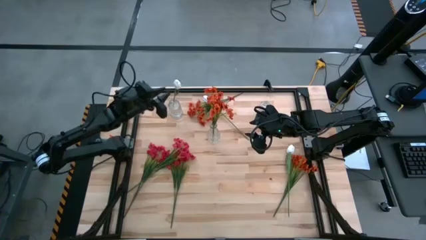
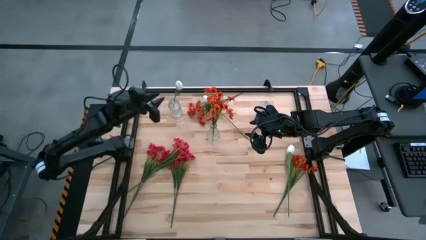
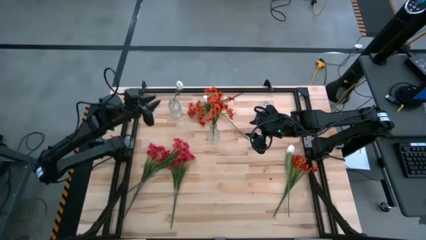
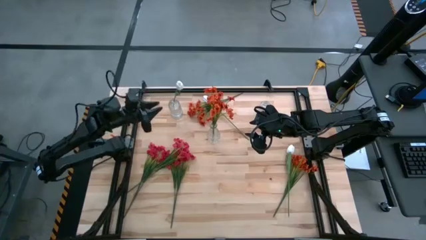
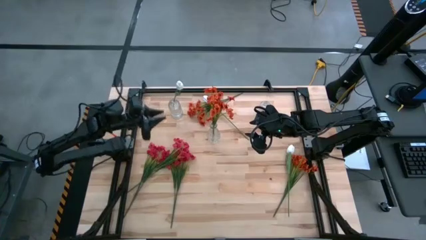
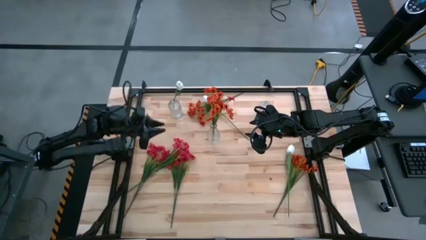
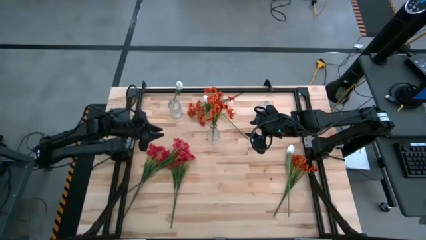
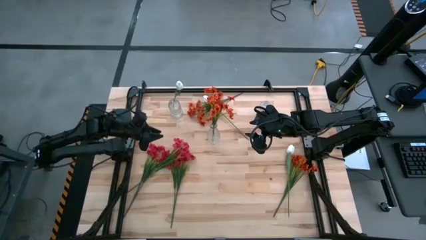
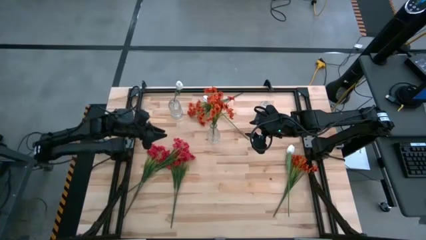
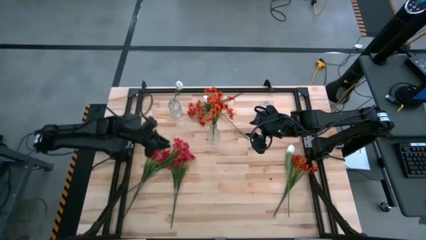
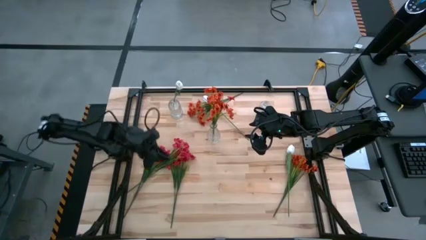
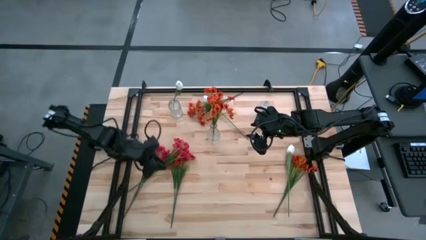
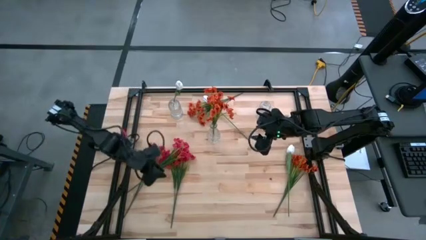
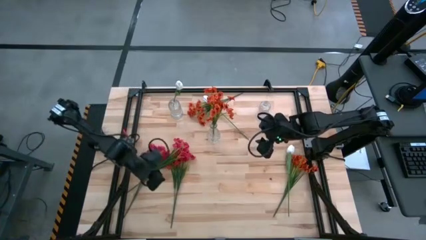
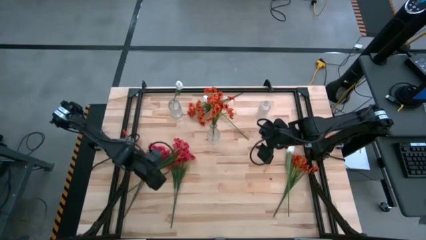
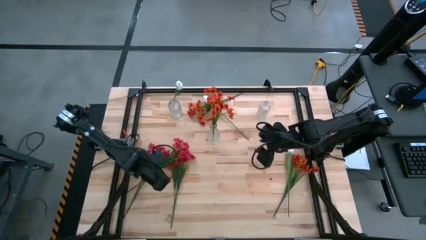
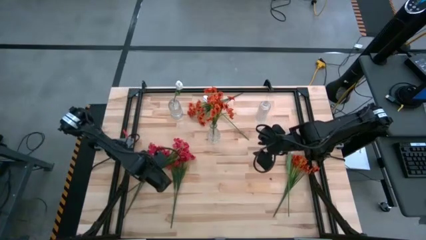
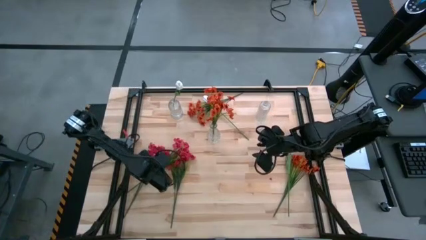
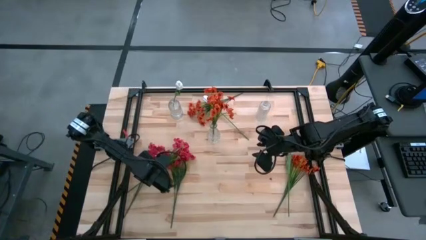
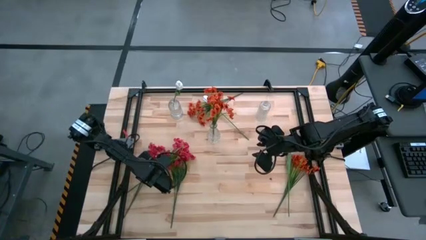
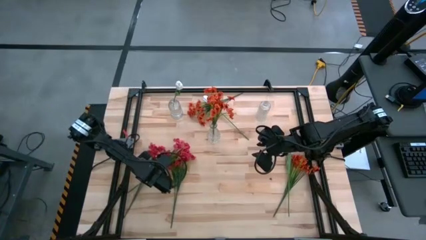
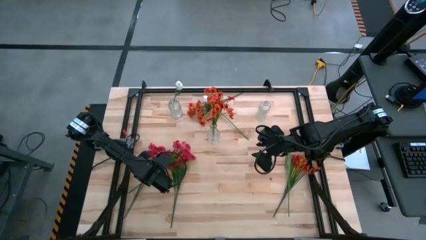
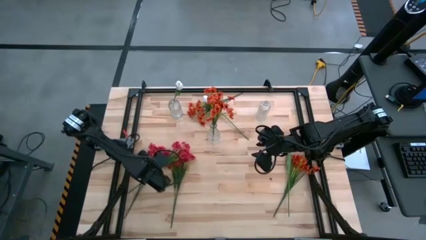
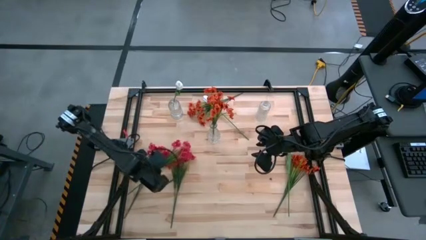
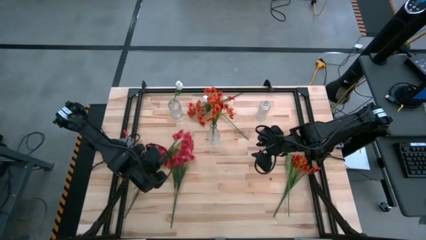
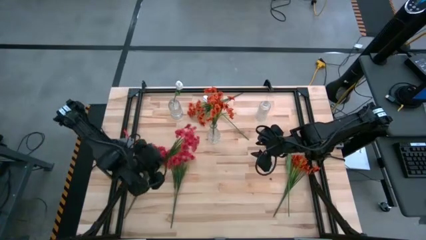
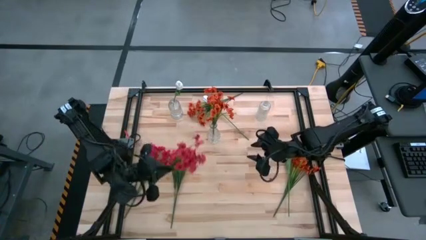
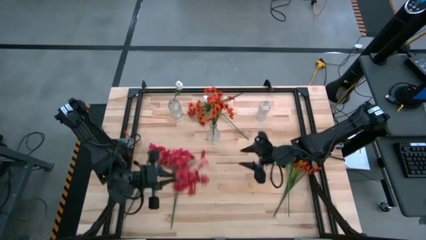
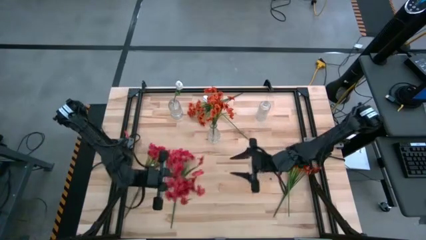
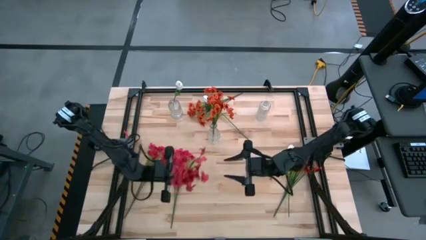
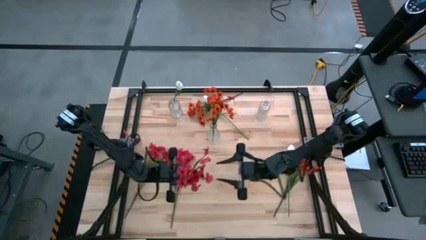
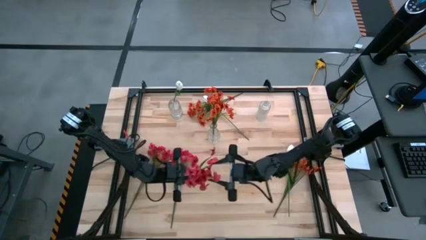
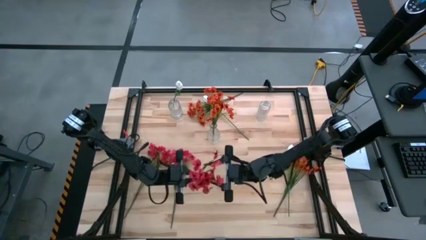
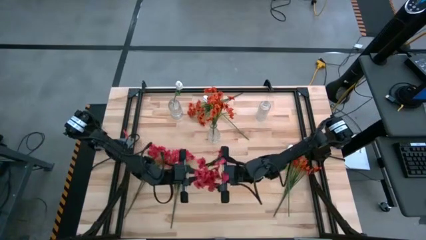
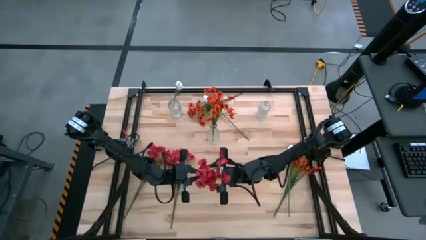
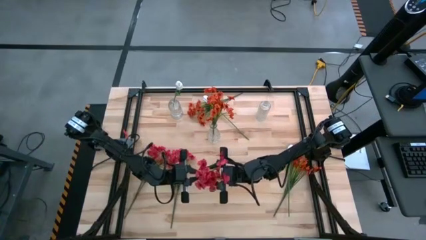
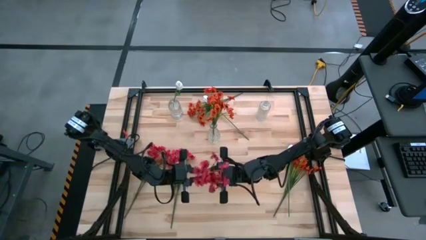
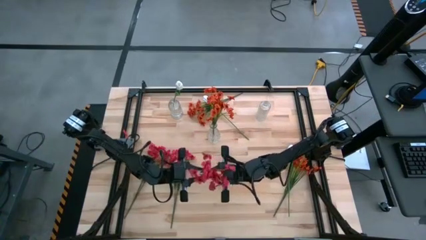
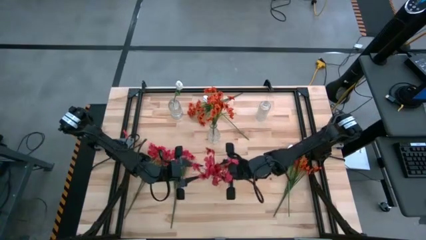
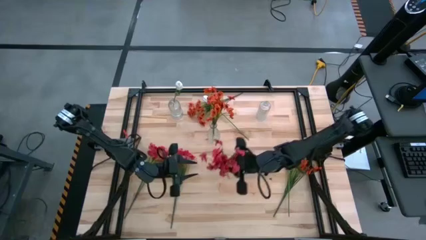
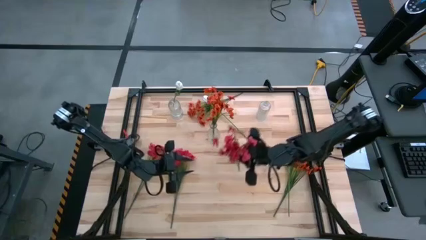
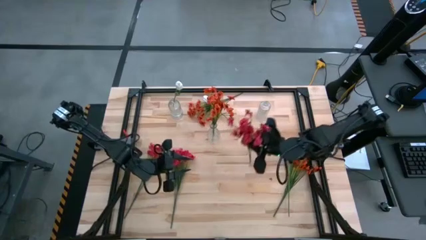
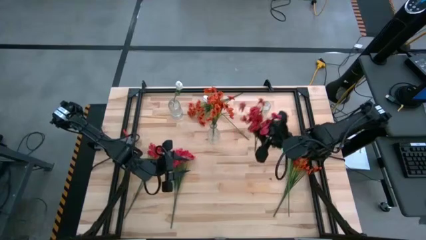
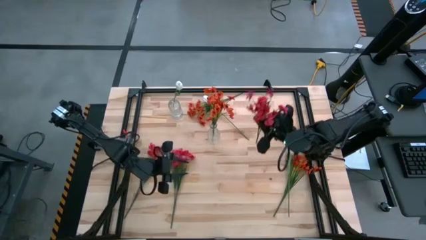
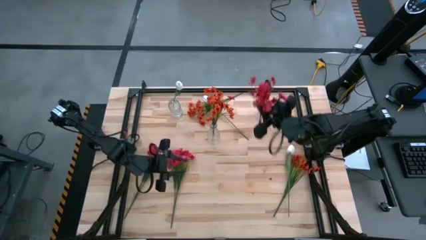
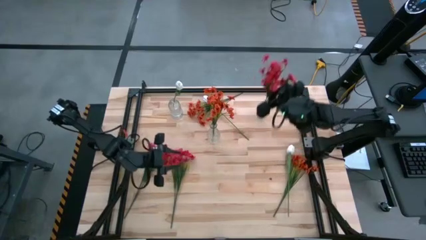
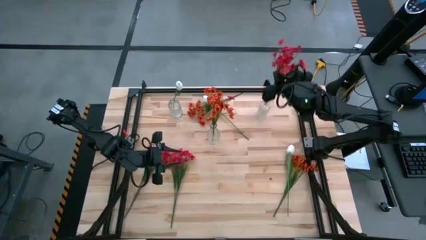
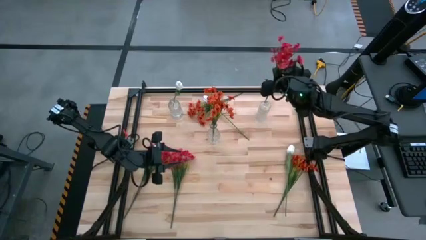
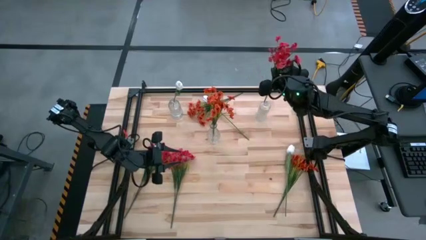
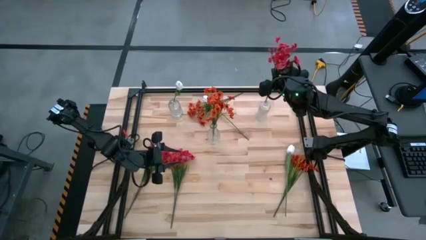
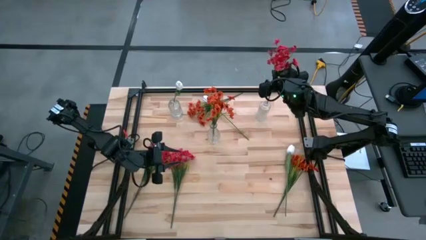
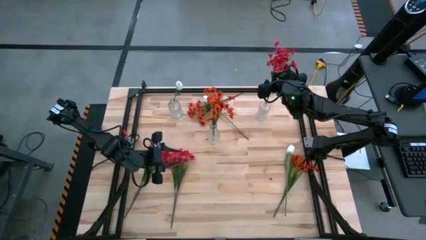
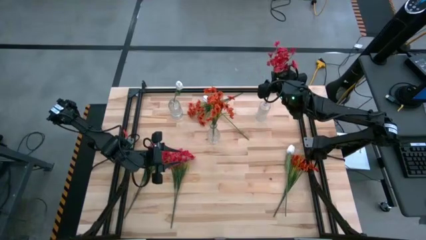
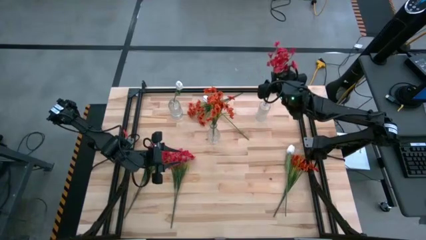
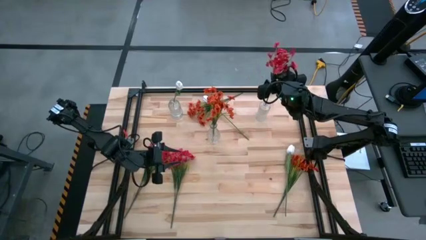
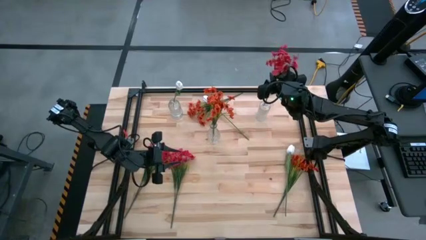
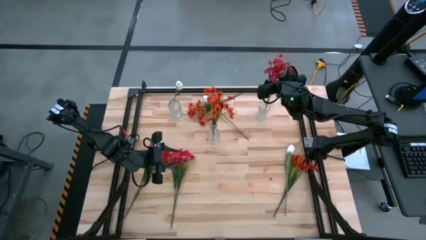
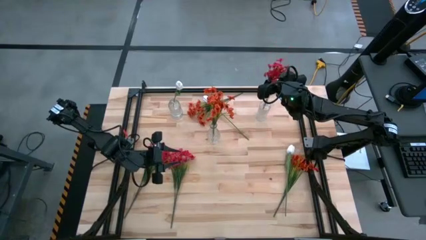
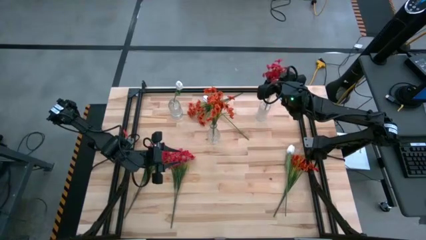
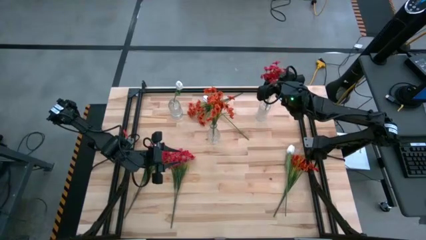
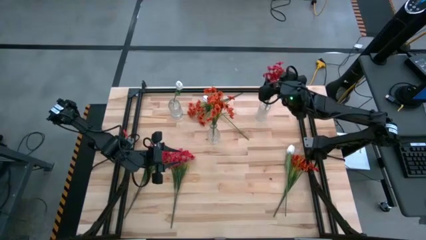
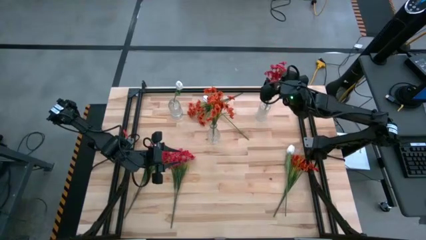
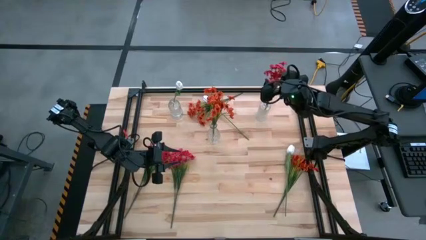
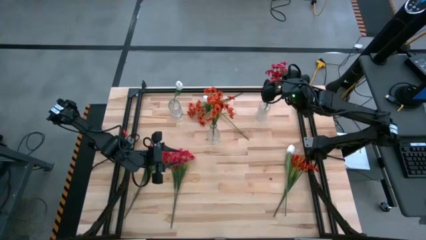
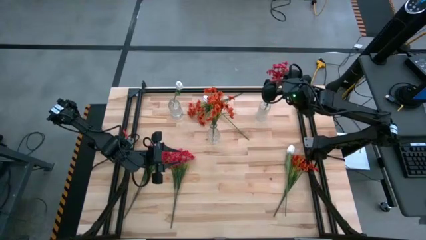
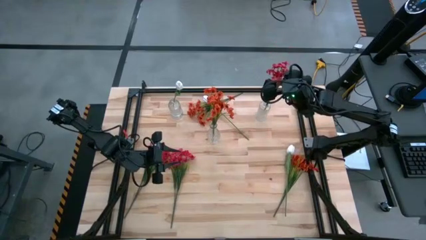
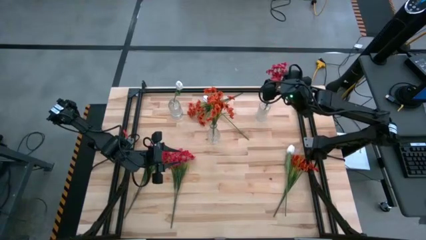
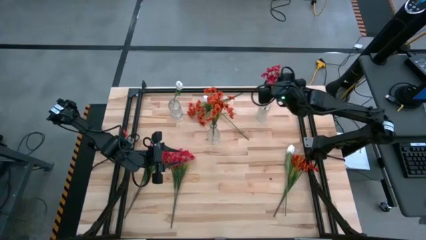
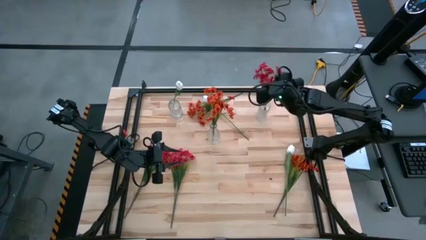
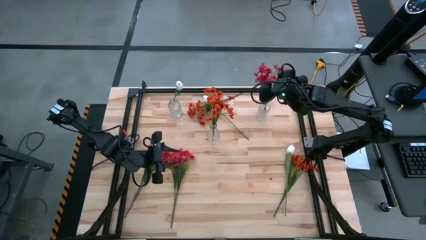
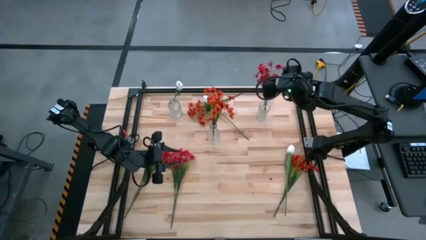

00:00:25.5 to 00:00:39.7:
Task: Sort flowers into vase by color
Put the middle red flowers into the top right transparent vase

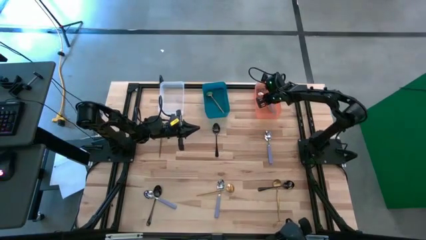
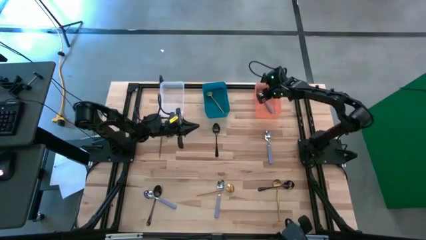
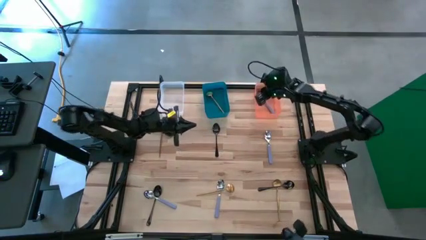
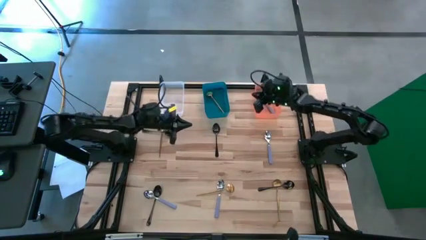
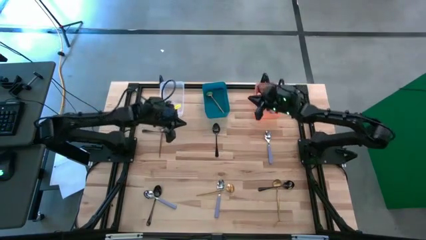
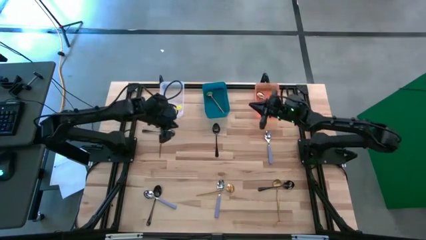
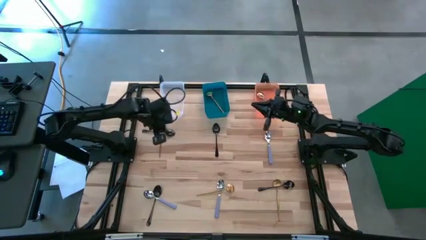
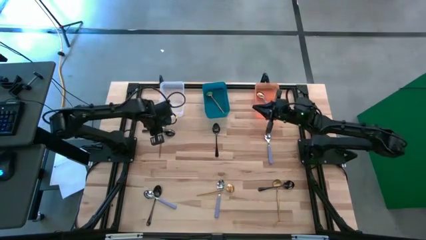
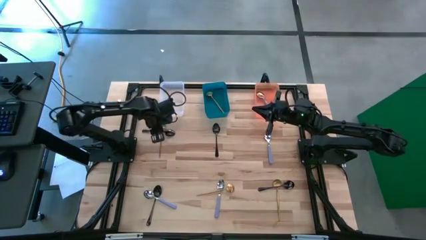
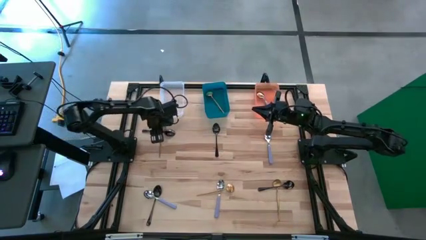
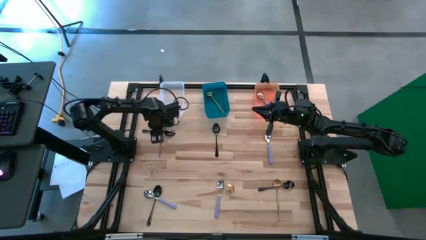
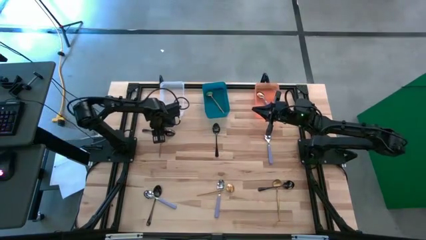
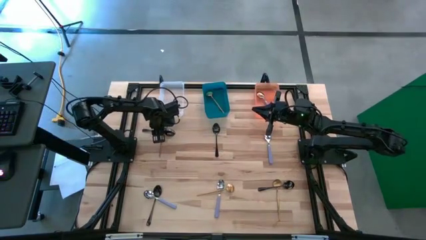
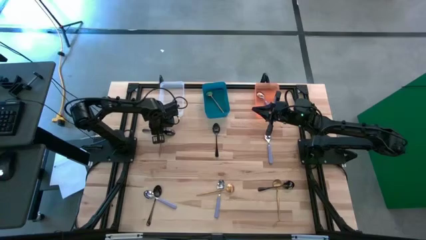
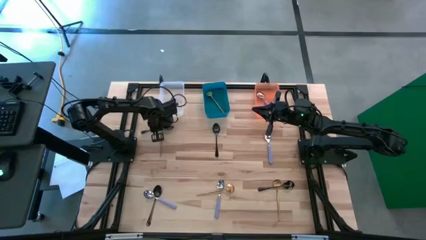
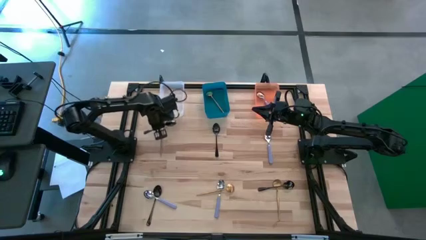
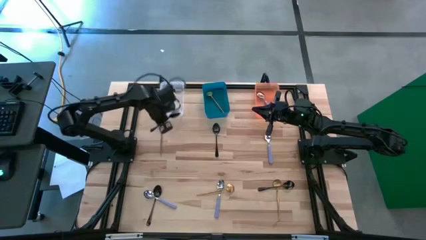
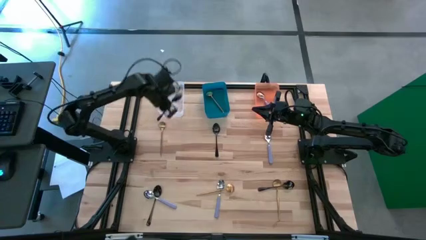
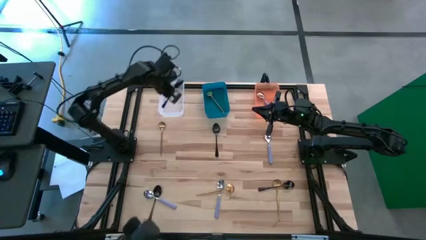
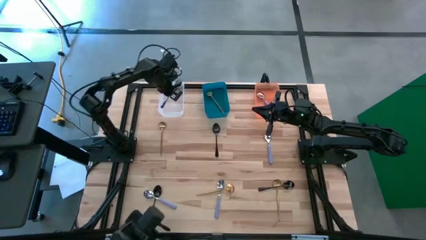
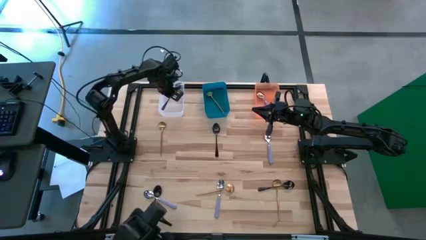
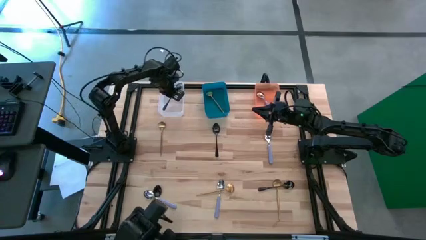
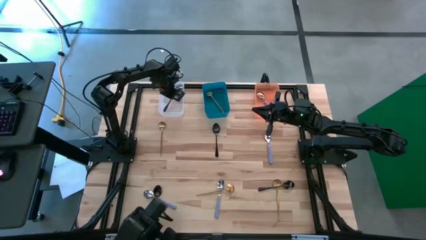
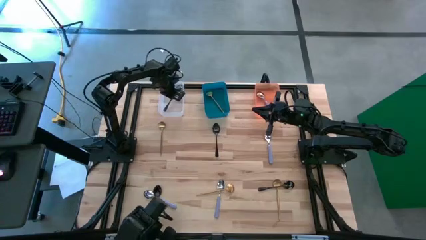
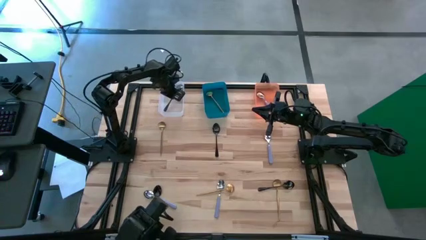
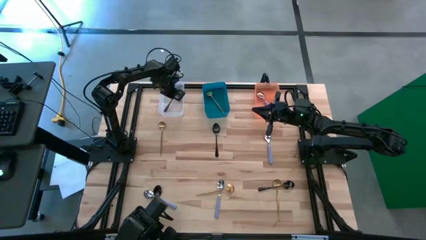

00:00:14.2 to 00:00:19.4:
Task: Sort silverware by color (type)
Put the top left black spoon into the transparent bin
